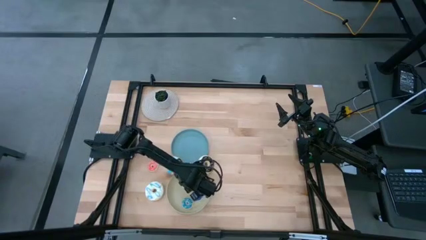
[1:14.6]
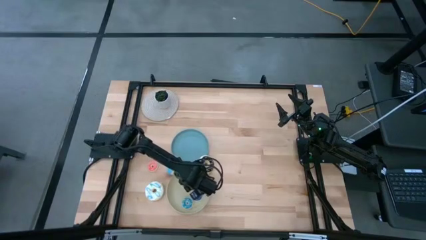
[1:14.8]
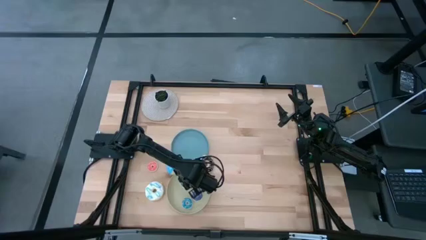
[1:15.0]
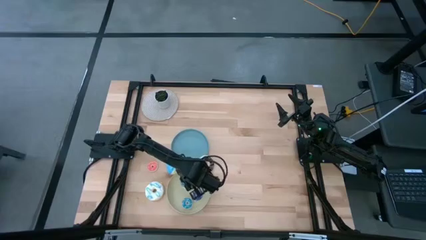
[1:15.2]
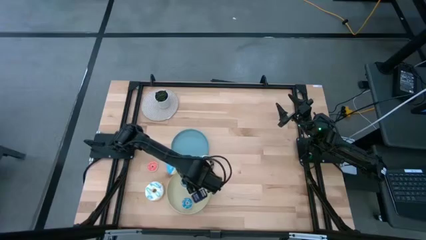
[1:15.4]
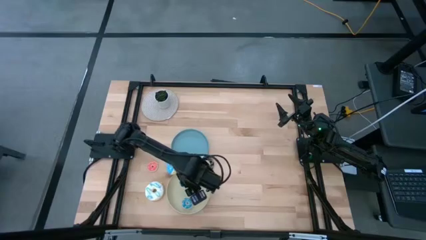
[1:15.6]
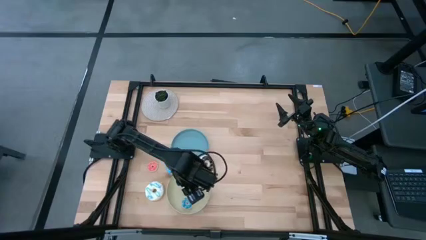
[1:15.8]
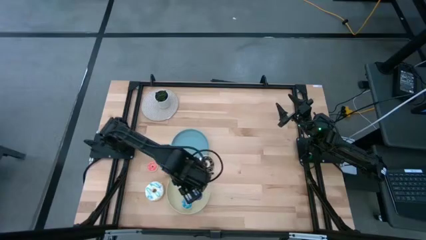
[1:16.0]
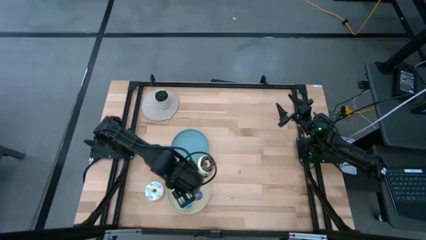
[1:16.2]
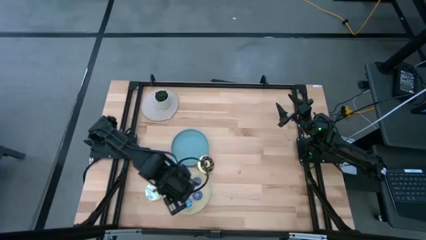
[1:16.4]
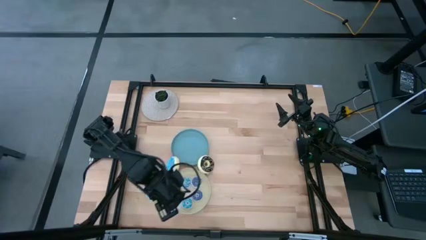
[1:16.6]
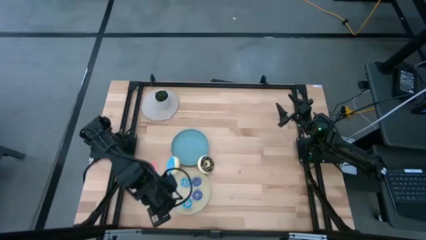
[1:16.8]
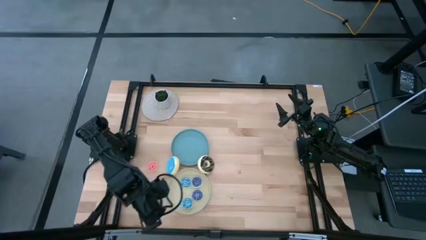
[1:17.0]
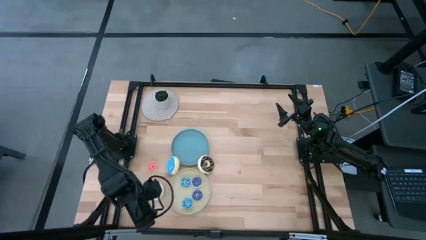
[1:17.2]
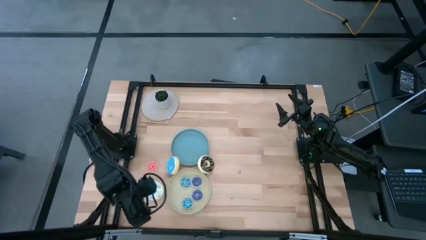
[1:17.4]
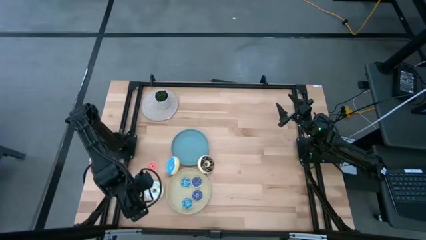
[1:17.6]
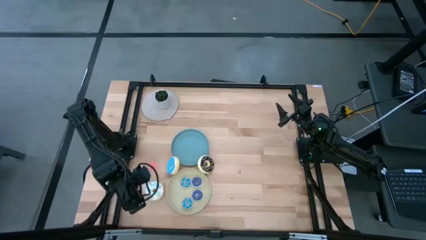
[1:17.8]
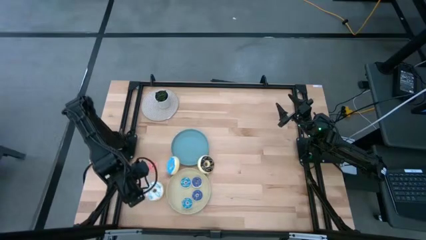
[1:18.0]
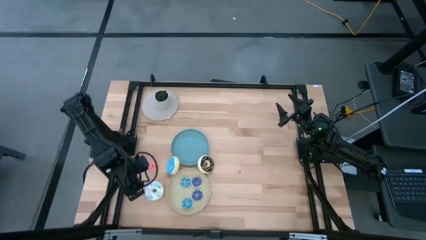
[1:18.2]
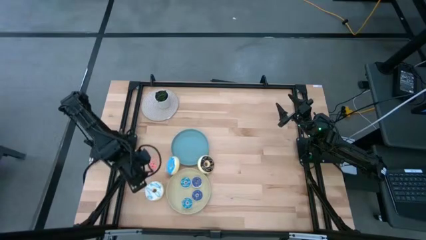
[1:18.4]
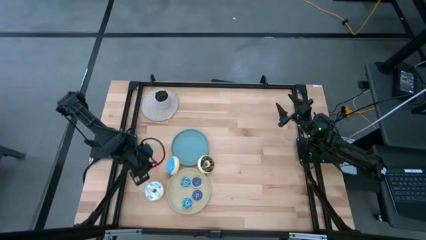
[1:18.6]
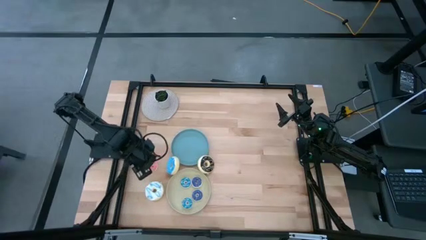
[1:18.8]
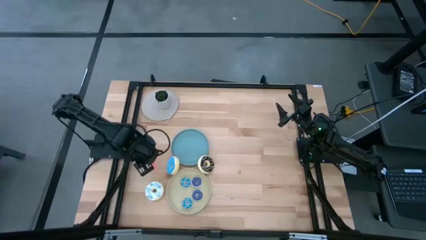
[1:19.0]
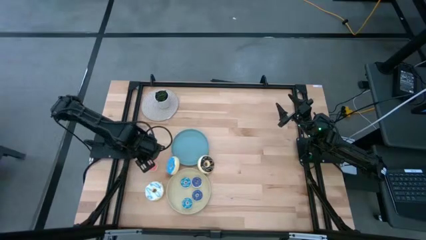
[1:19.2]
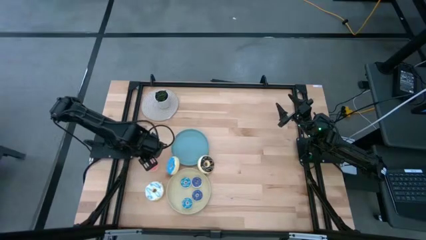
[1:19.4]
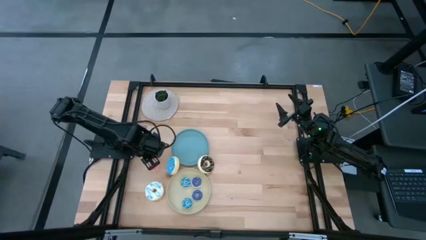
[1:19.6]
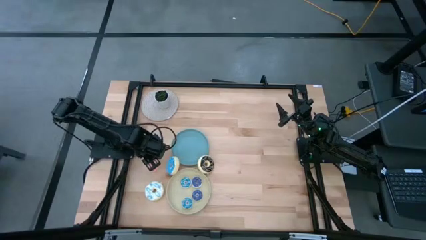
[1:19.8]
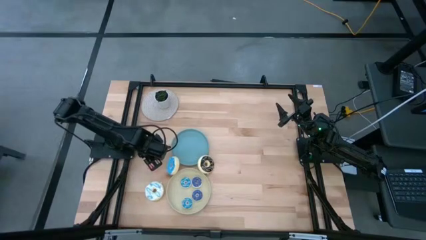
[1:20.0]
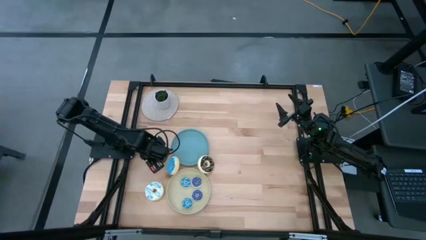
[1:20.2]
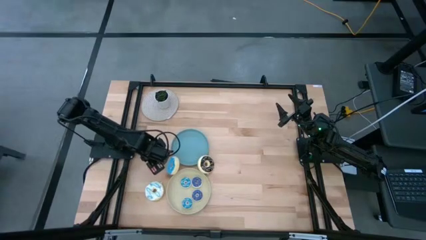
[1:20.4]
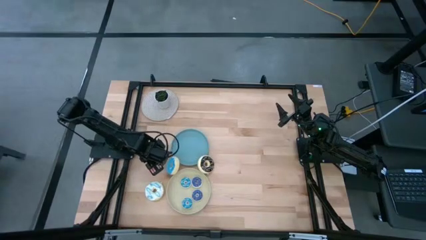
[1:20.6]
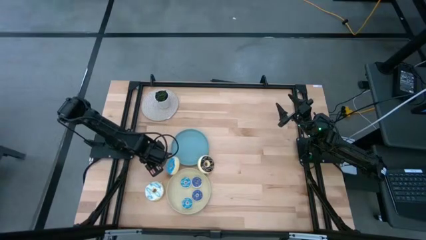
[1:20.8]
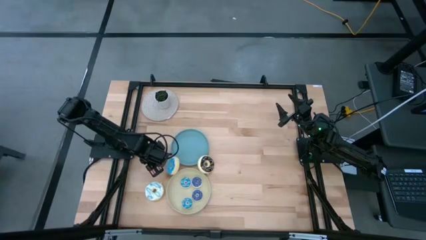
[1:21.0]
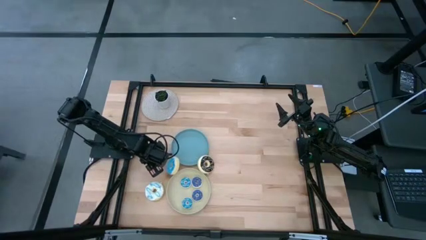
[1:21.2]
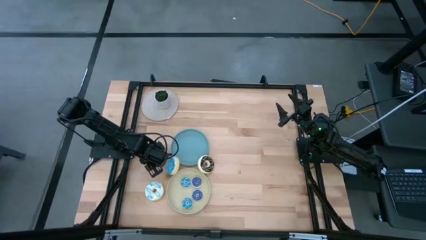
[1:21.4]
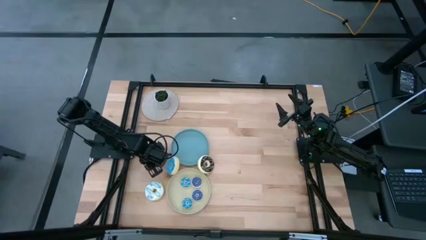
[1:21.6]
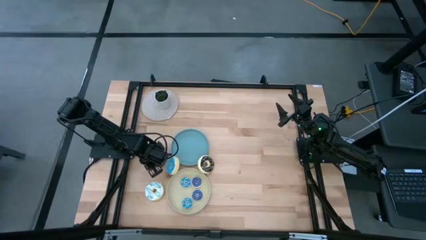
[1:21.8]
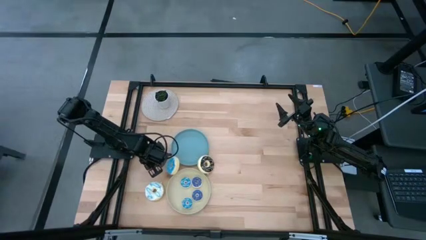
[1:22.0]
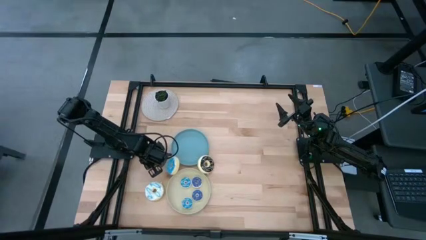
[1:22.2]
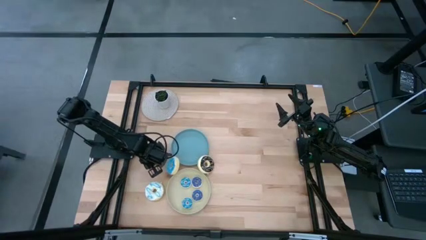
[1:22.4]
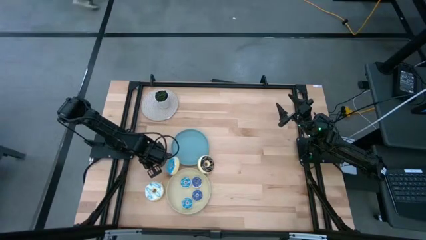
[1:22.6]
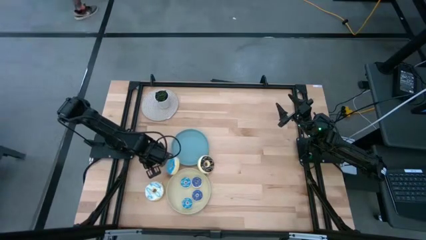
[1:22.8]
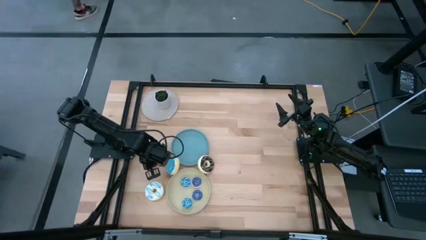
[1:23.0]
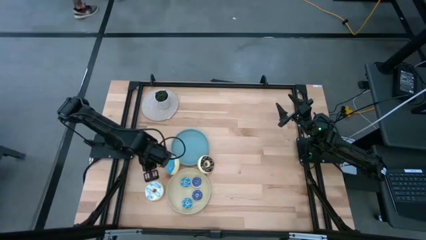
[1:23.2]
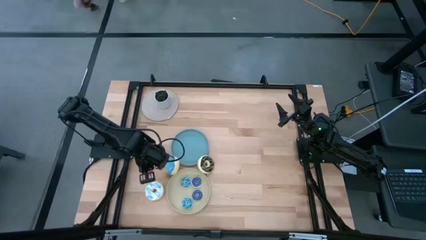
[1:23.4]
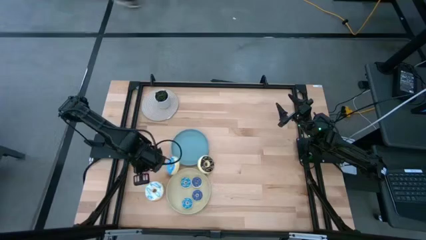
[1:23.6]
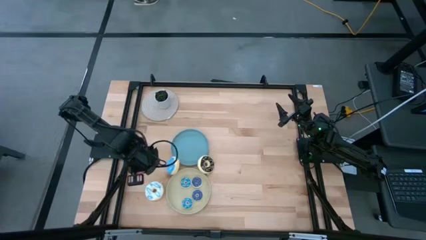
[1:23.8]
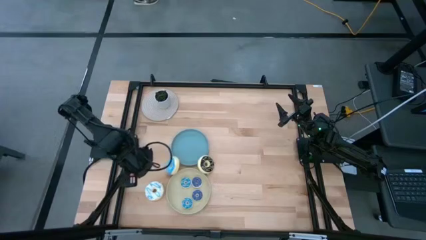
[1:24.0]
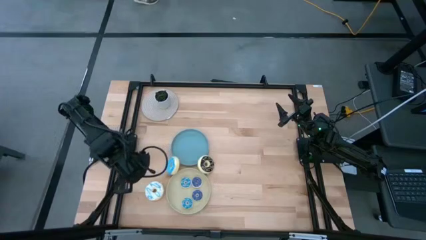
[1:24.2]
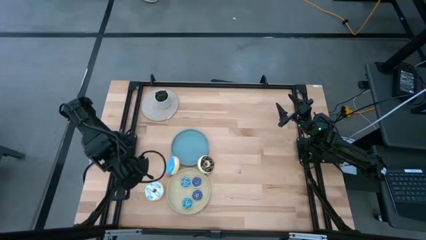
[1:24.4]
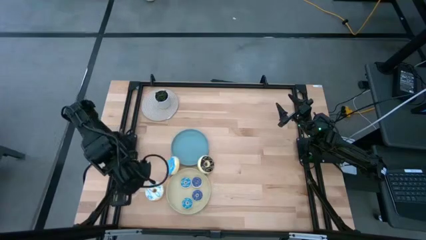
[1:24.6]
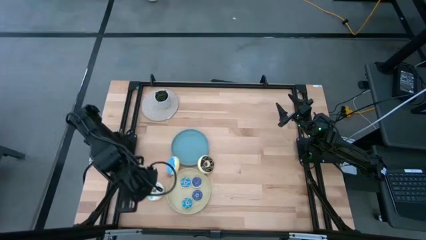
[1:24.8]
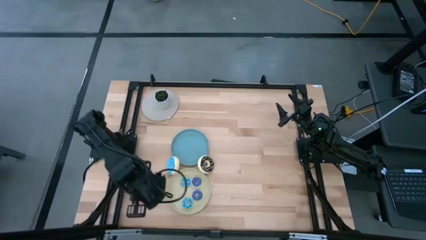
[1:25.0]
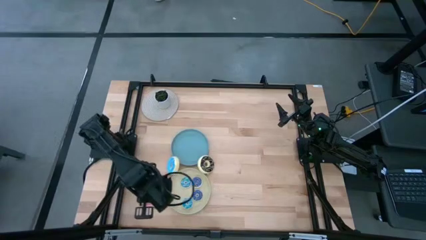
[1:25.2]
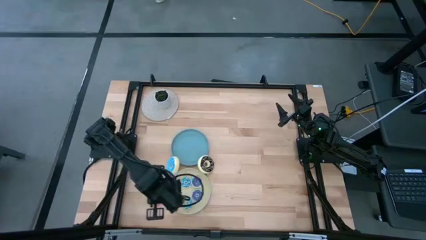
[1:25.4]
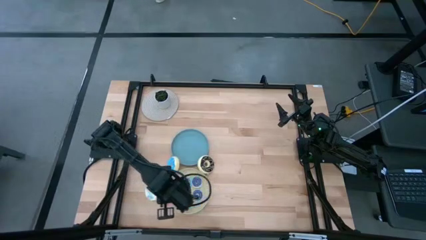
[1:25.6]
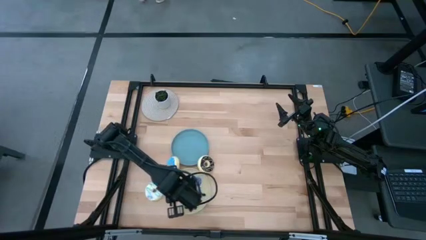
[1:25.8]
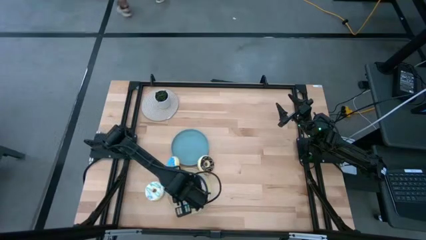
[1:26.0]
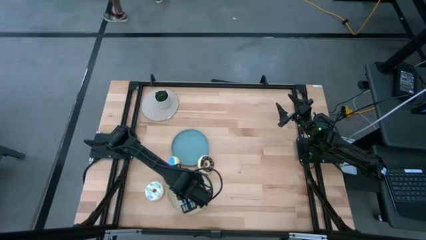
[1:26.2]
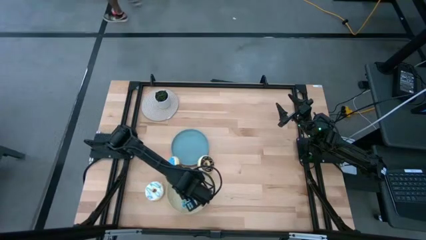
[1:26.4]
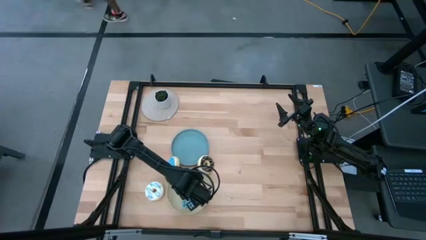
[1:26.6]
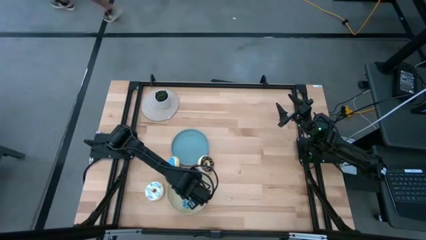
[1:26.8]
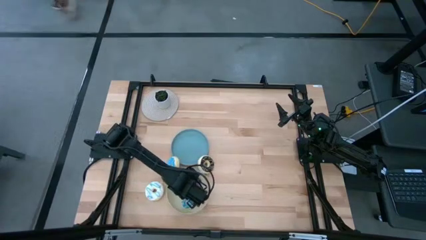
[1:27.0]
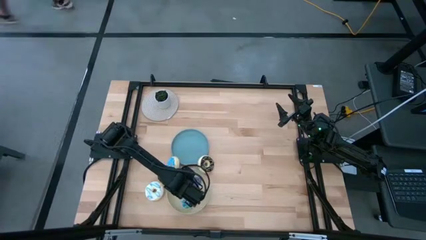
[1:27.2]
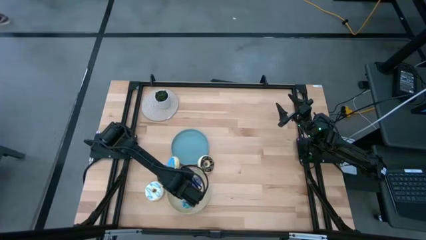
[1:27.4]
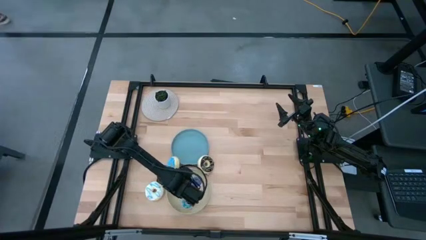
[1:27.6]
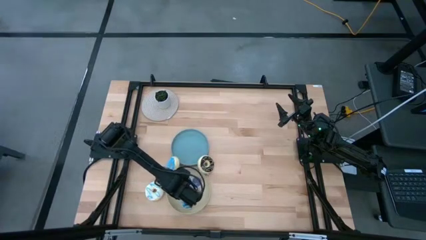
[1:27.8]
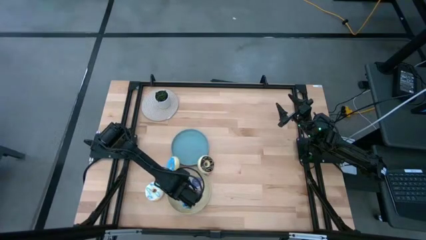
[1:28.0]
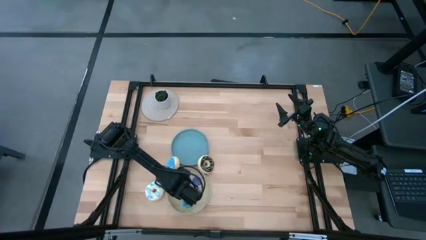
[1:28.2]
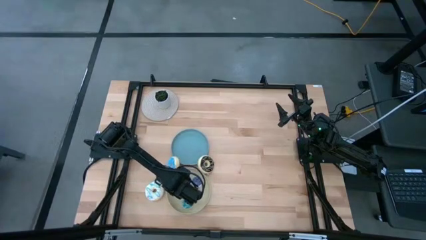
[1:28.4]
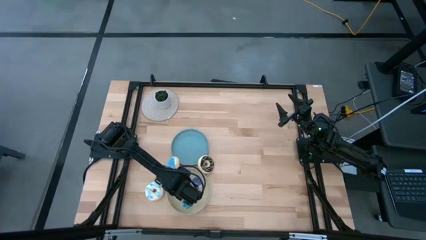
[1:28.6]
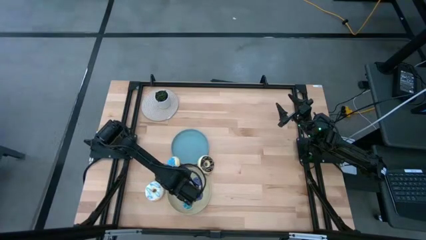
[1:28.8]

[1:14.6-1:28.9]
Task: Pick & Place donuts
Put the small pink donut on the gray plate
